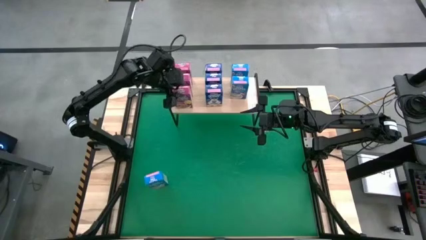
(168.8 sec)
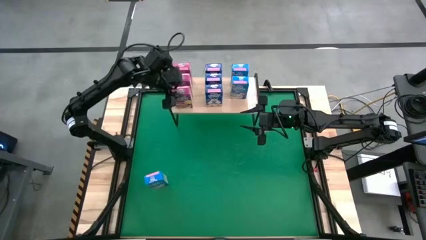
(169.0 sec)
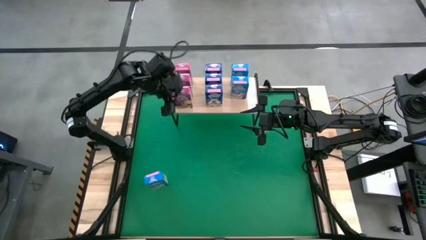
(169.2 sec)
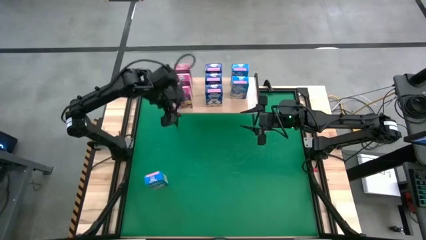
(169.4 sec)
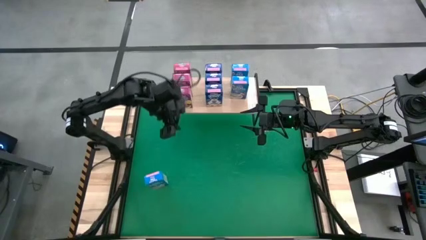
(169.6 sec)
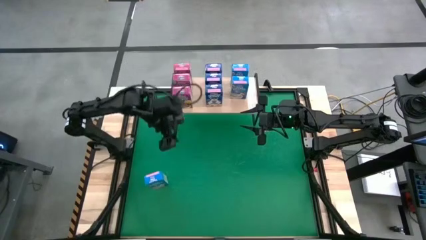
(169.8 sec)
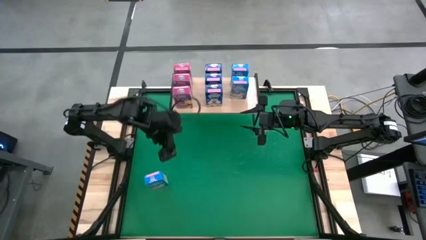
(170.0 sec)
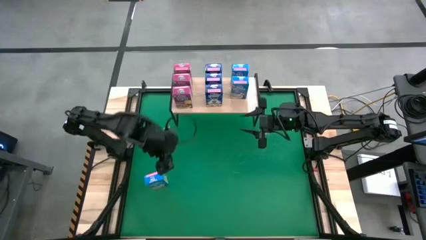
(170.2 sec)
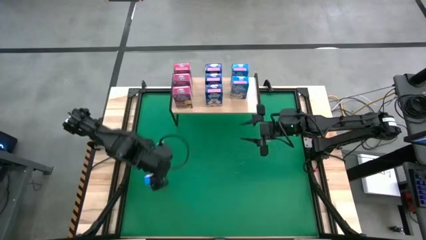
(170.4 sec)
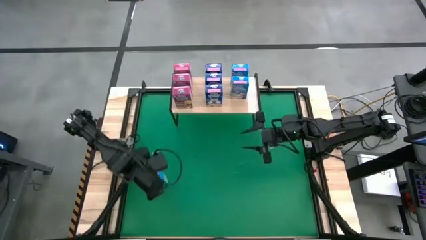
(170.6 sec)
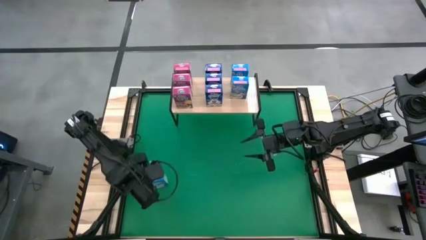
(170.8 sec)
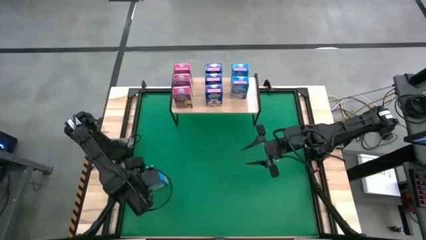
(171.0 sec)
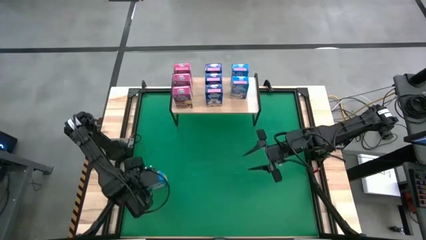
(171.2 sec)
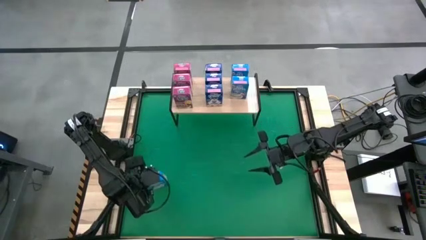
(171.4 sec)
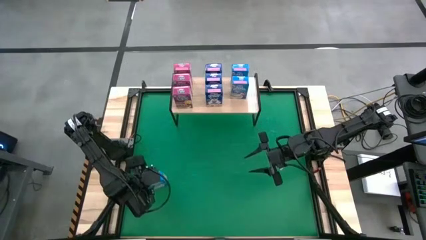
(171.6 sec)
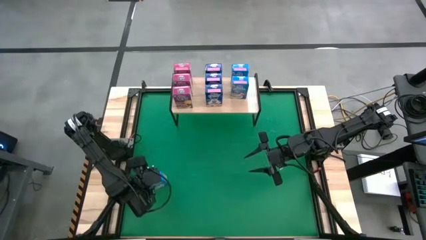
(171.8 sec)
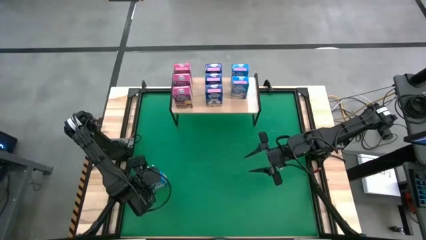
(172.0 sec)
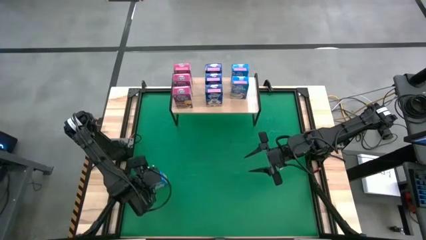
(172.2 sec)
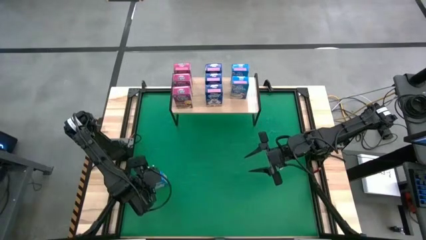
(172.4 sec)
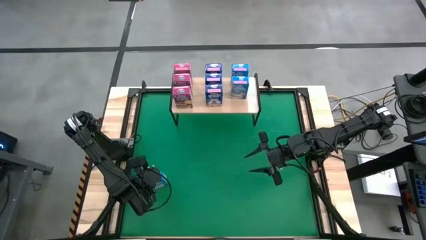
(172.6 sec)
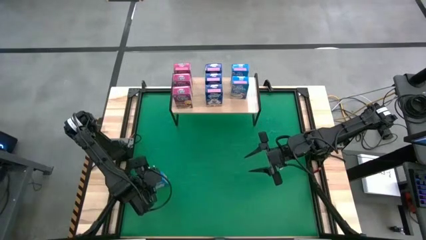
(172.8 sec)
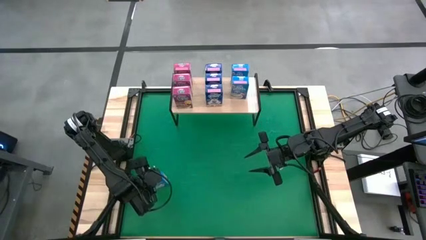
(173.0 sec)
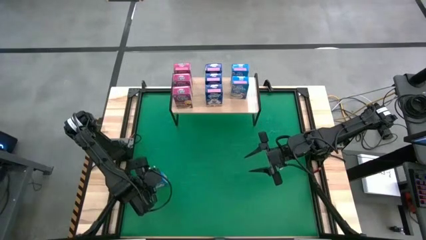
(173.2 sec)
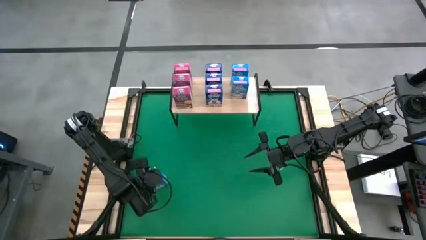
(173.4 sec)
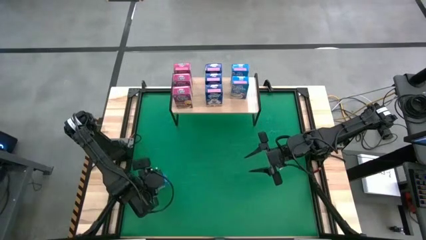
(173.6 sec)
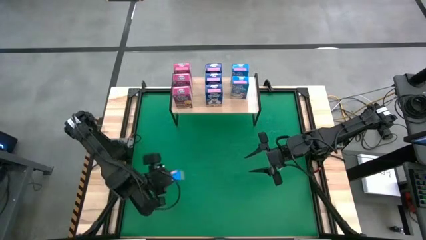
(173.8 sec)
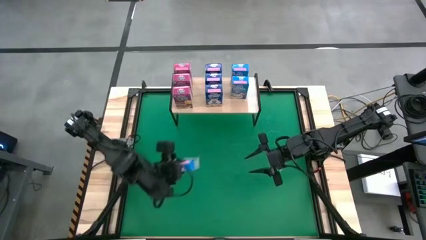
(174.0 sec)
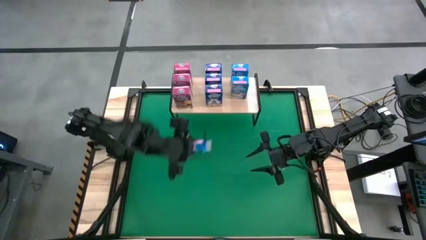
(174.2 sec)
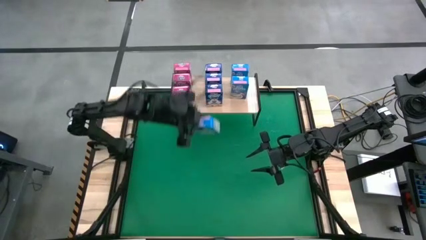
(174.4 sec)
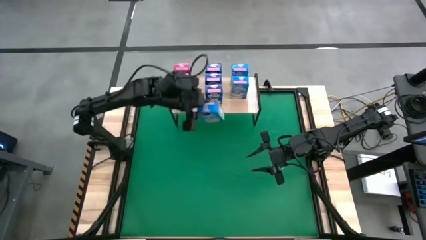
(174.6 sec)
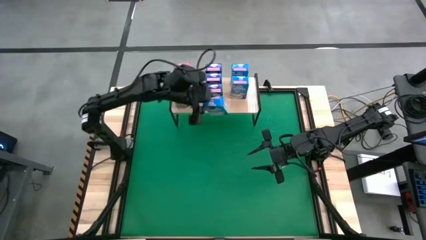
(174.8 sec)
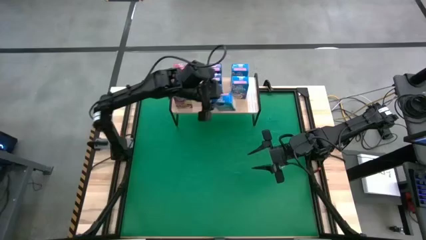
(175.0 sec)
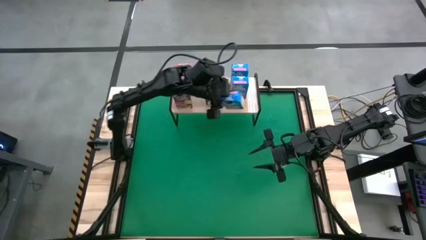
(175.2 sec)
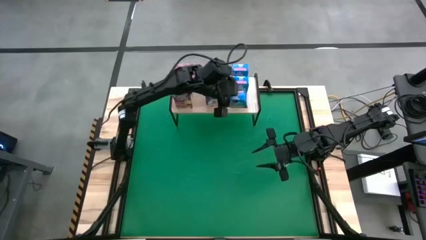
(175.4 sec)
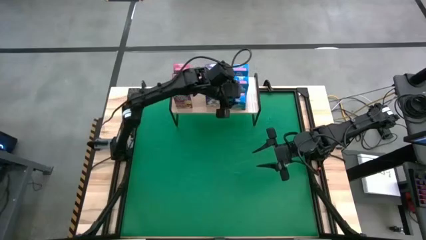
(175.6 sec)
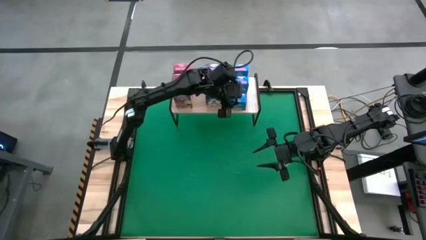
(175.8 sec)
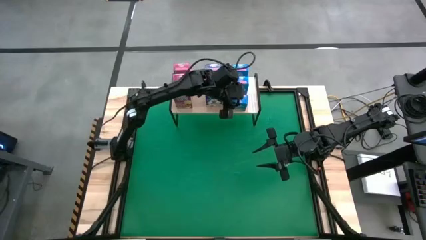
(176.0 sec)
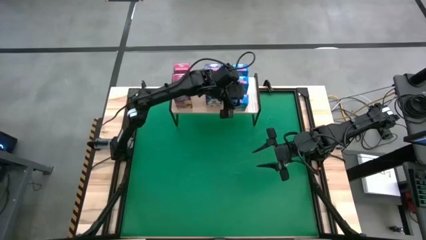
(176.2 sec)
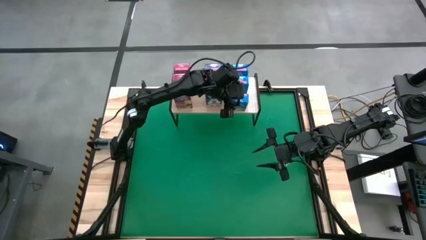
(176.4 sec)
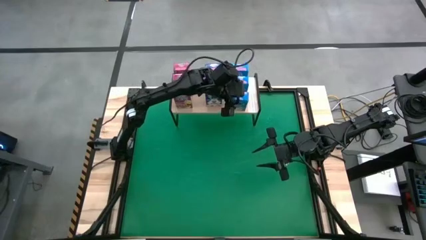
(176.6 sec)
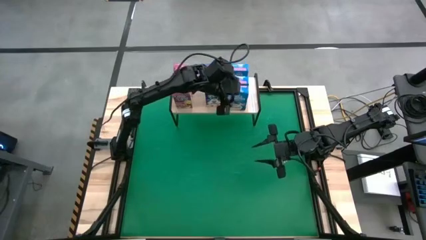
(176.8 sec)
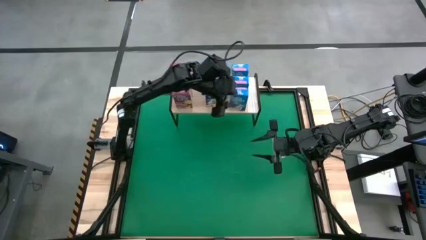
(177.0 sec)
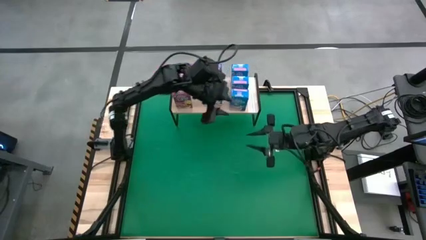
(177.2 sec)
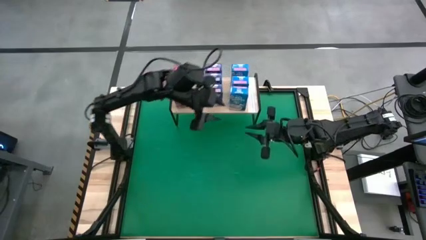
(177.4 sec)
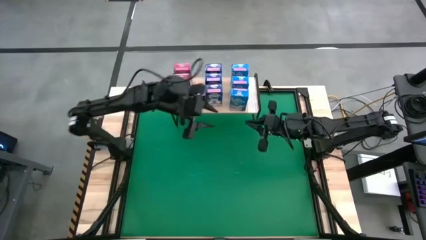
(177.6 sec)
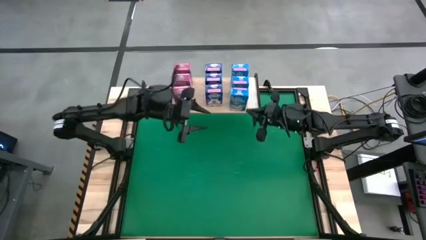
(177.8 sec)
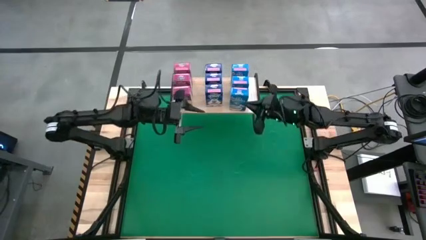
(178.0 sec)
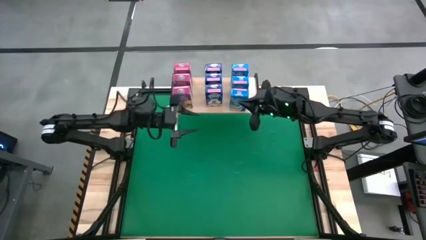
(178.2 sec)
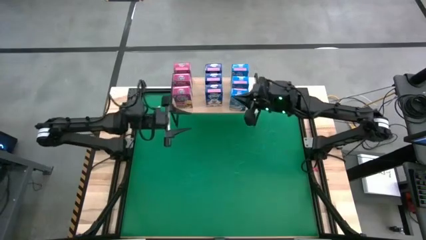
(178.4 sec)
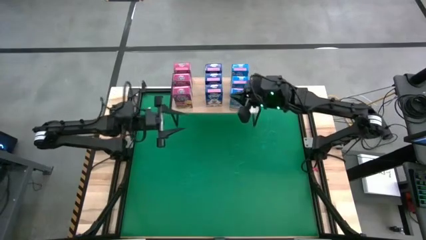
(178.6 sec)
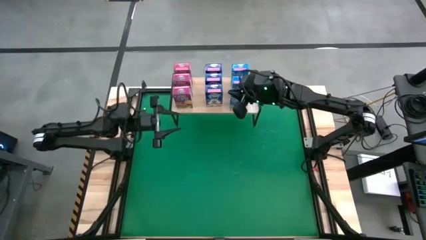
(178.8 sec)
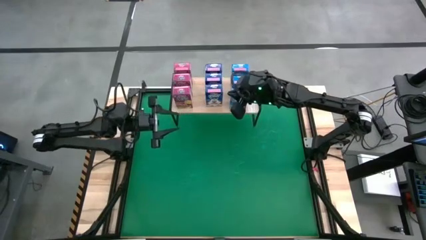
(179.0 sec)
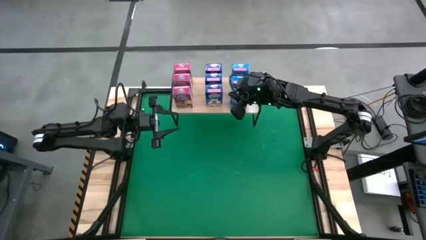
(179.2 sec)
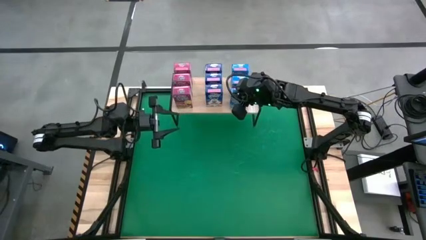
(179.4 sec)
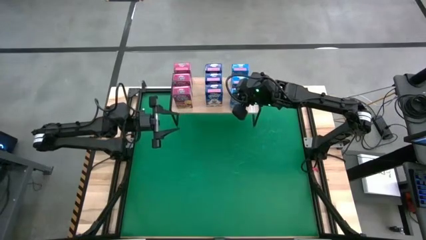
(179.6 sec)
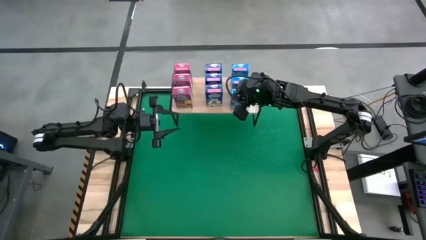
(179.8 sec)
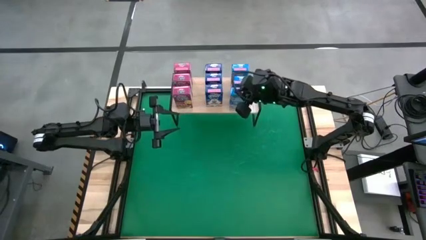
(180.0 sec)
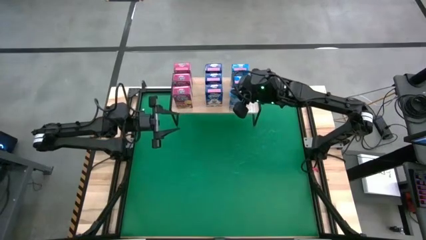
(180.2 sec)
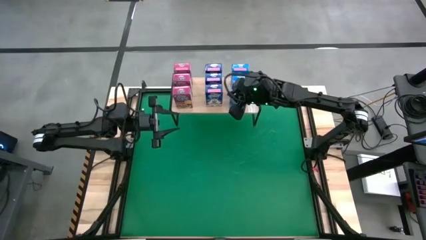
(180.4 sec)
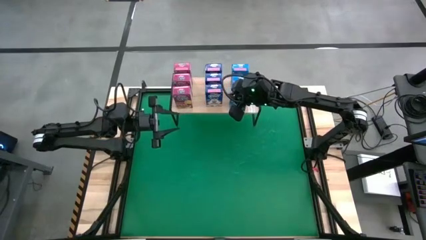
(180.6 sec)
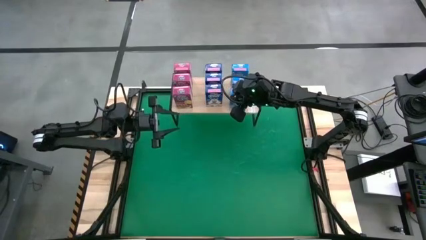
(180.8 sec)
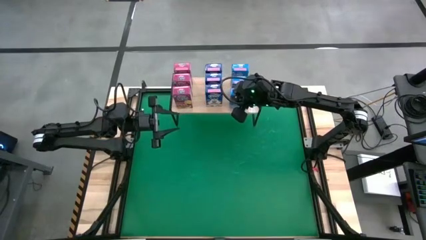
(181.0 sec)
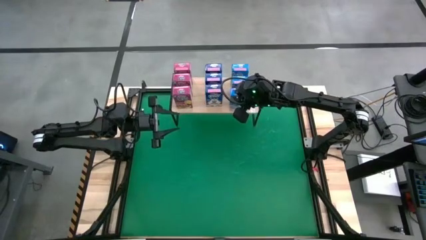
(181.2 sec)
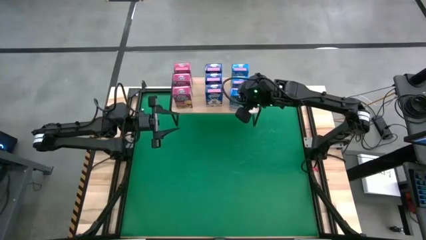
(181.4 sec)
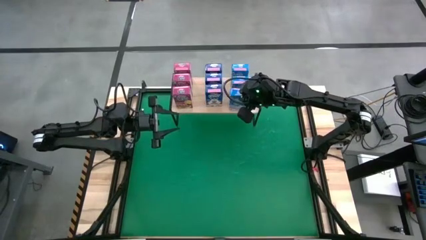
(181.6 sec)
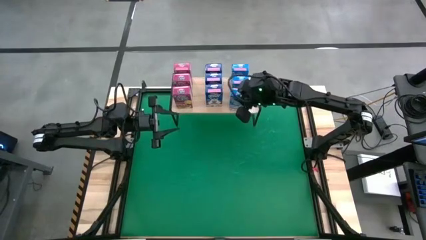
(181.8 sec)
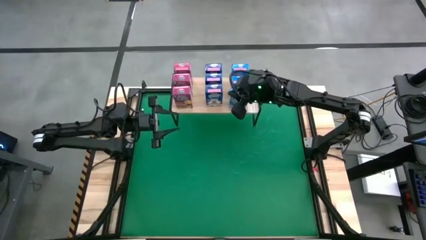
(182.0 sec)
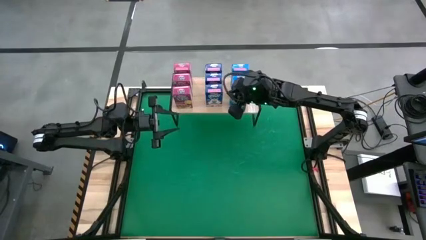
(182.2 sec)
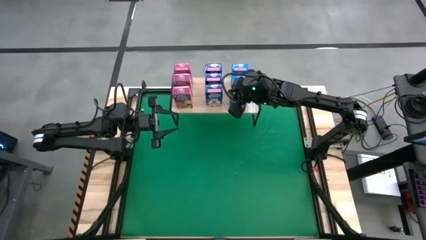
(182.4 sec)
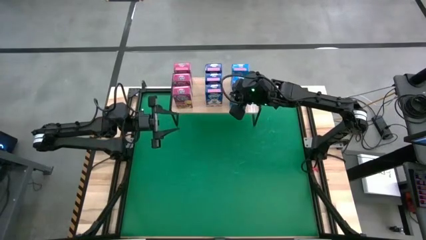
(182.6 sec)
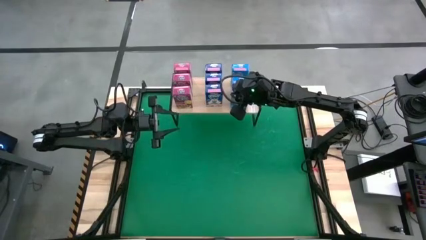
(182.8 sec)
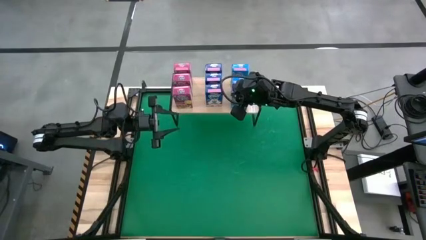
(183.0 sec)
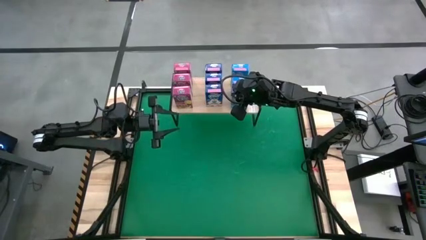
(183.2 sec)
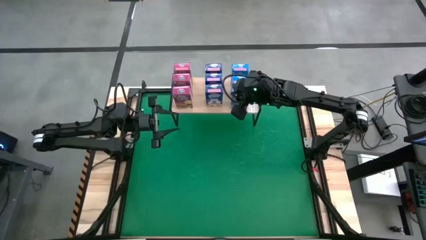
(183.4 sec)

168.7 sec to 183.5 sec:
Task: Stack cereal on shelf
Put the light blue cereal box on the shelf aligned with the other light blue cereal boxes

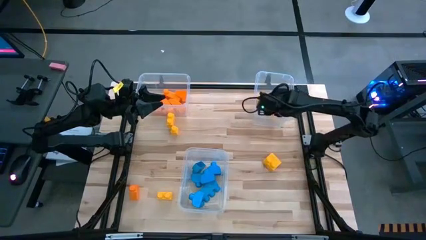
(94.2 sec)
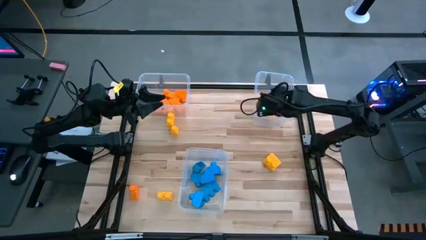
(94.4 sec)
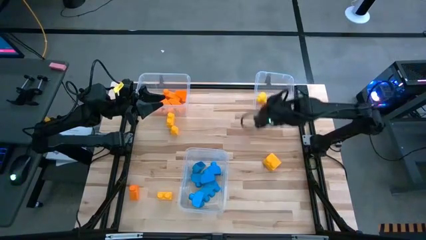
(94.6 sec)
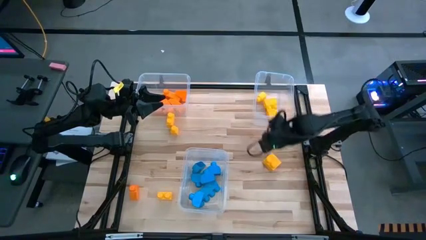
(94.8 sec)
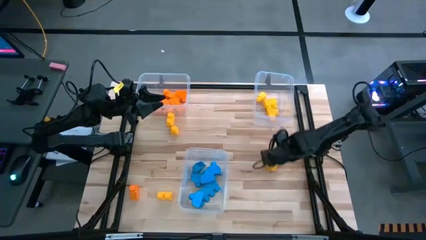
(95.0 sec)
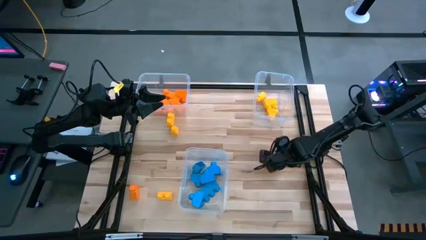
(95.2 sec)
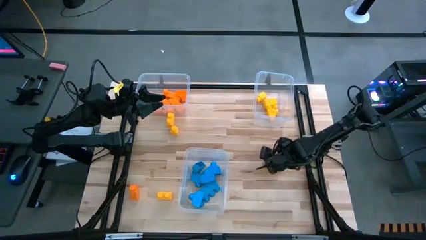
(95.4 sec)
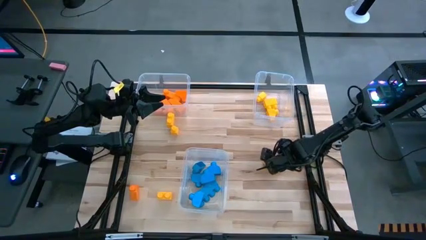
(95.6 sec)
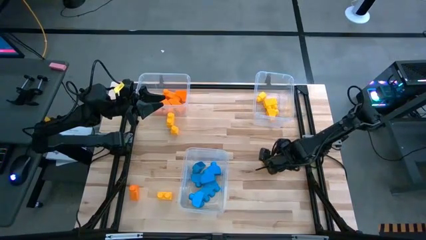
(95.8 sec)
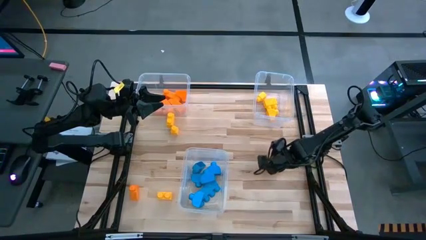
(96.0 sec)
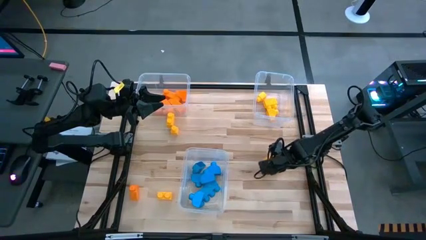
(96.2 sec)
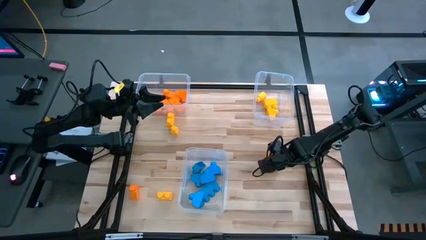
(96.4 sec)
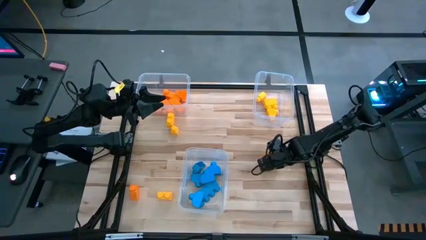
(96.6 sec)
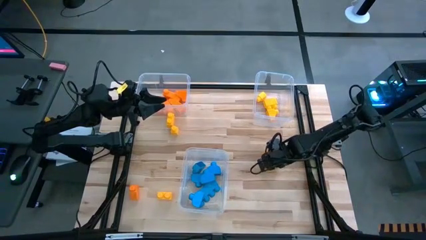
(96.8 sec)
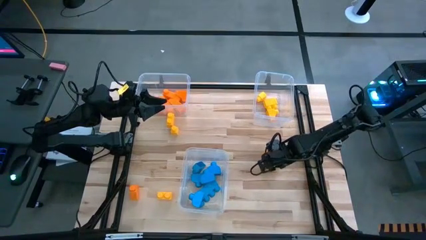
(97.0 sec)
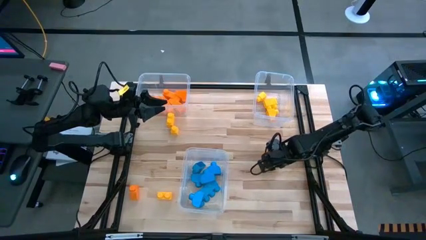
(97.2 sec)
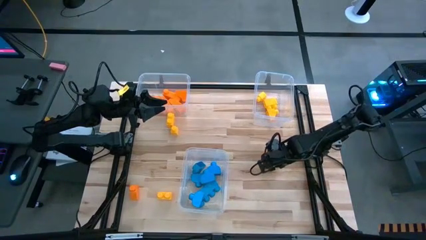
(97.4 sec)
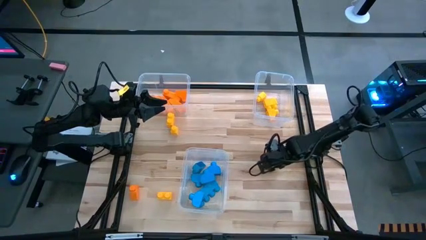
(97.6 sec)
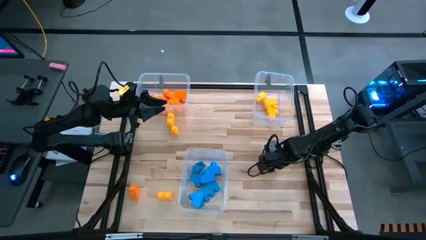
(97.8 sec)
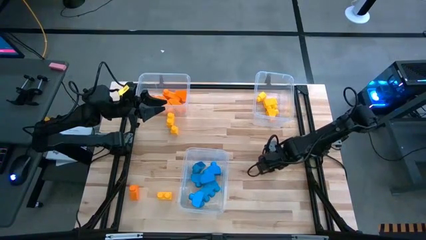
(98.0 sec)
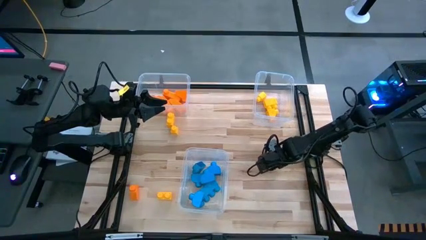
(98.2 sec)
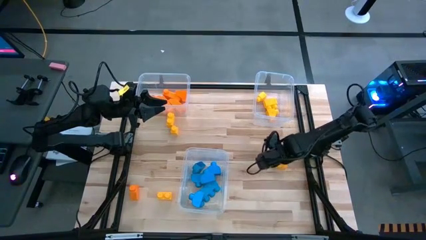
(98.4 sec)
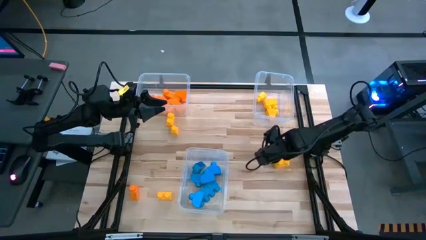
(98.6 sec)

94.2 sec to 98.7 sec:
Task: Sort blocks
Put the yellow game piece into the top right transparent bin
